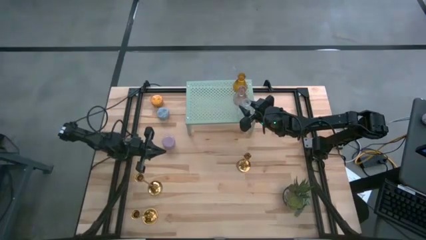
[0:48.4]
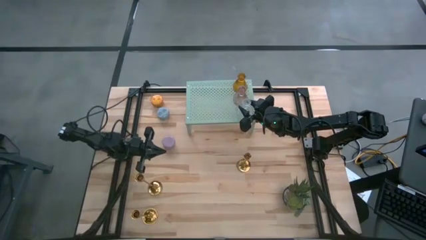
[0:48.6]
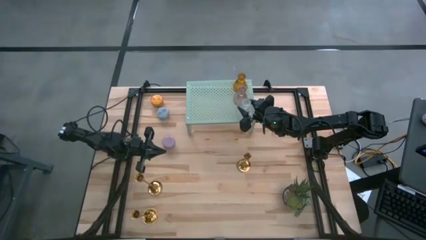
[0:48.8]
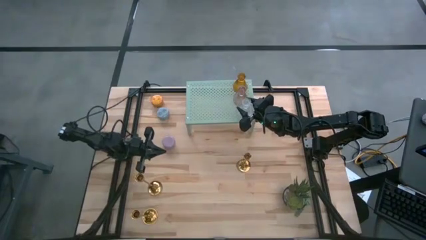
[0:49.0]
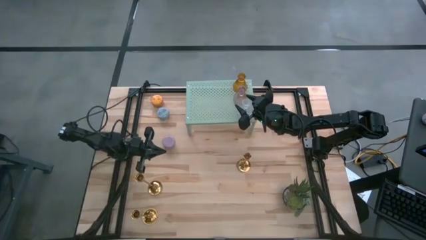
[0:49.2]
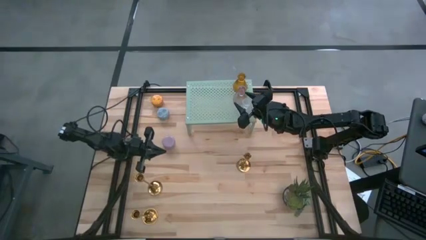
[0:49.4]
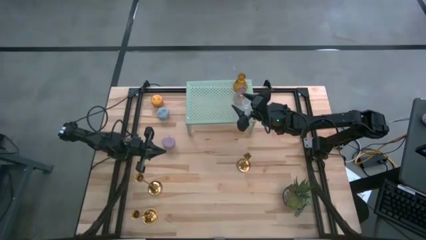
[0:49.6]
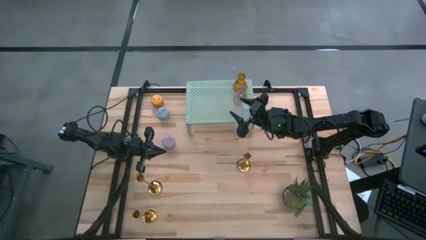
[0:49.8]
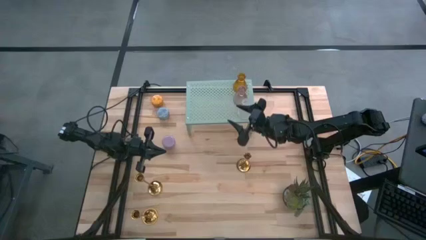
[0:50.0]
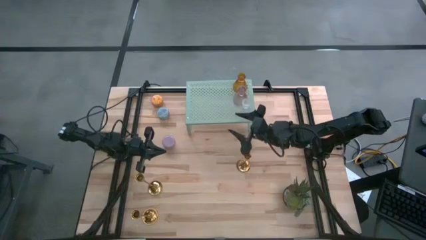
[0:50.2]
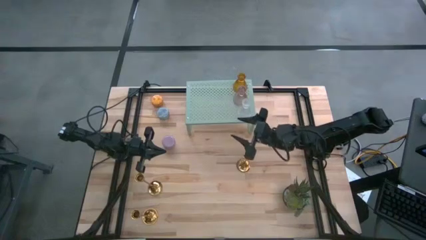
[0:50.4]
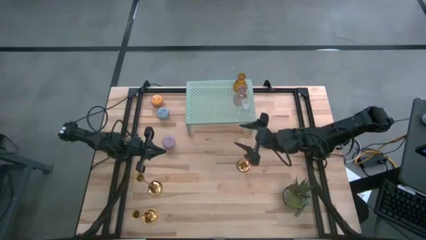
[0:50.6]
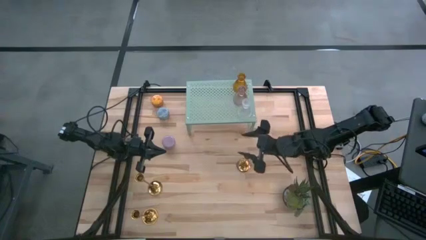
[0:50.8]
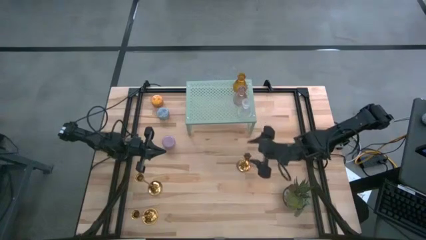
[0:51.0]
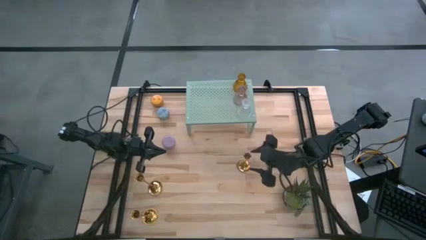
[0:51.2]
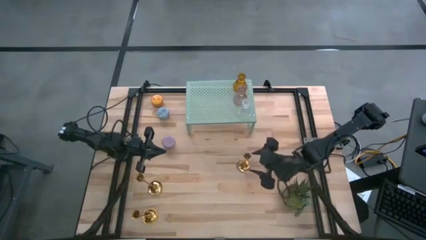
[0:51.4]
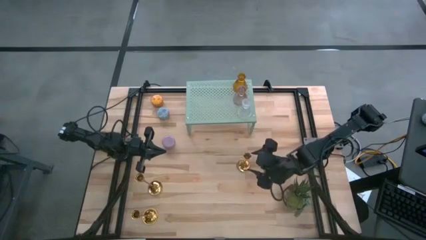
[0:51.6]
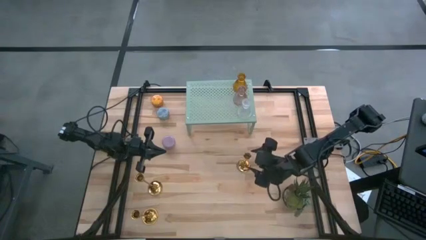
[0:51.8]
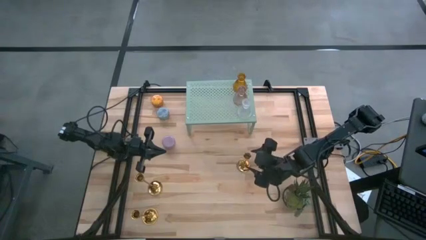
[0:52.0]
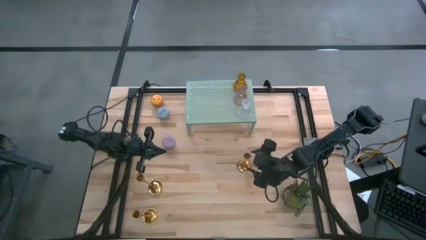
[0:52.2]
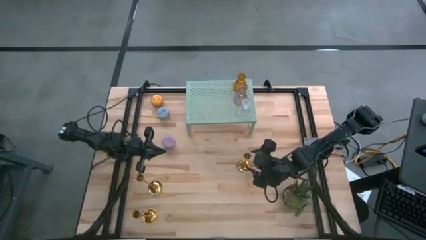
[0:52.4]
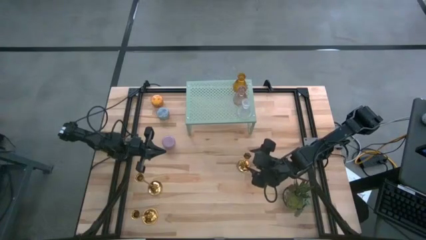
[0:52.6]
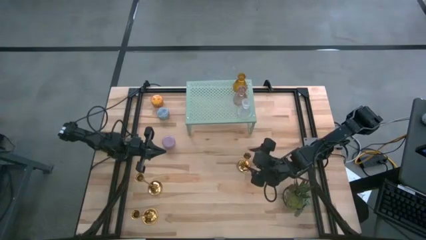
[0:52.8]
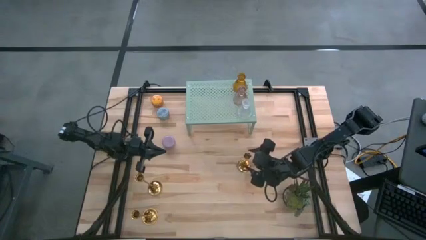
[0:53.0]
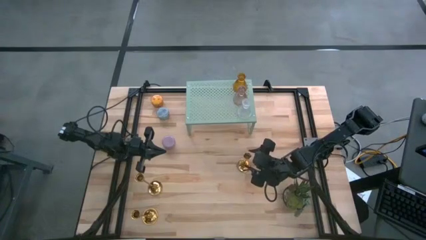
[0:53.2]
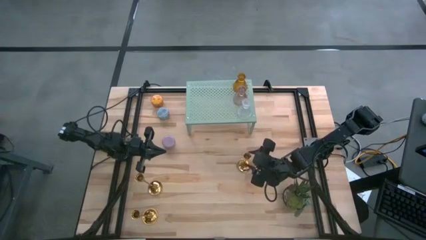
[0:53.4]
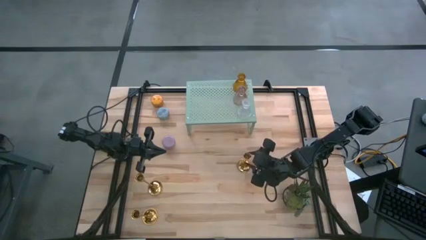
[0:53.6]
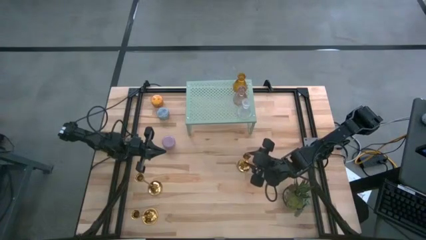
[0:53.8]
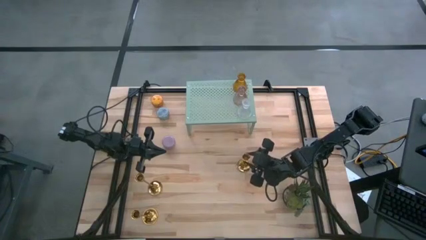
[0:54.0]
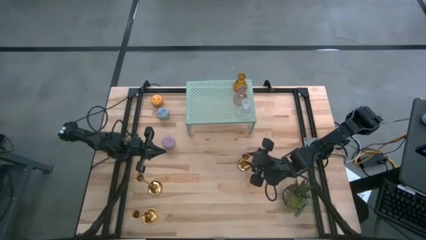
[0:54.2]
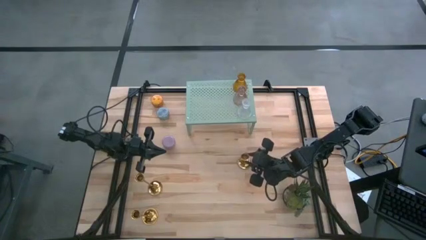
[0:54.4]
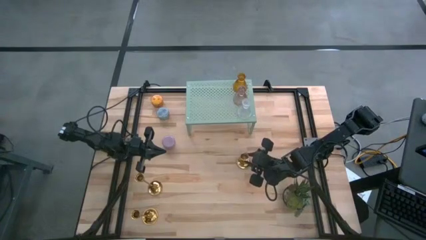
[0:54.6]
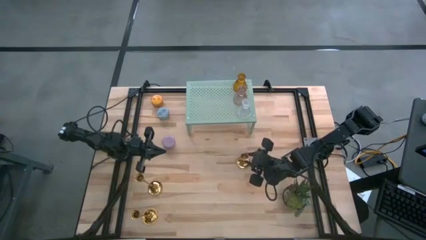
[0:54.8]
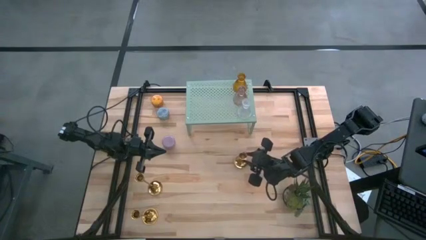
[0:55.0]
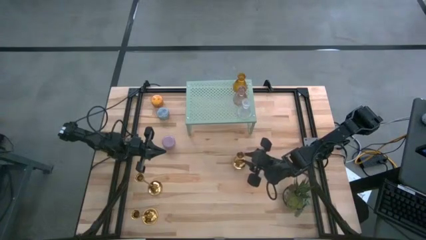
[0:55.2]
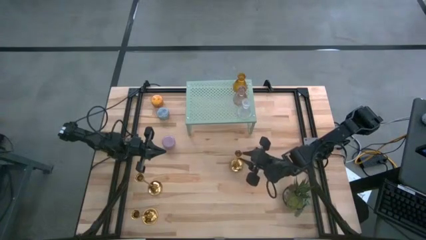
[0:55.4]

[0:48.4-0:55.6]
Task: Pick & Place candle stick holders
Put the top gold candle holder on the shelf

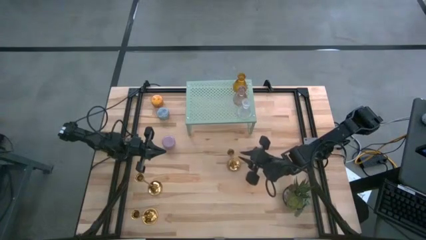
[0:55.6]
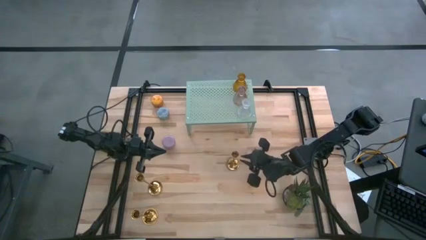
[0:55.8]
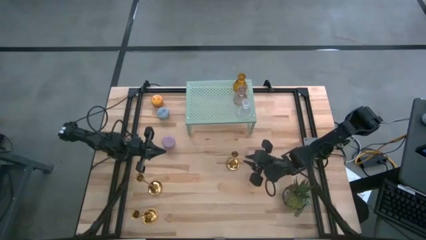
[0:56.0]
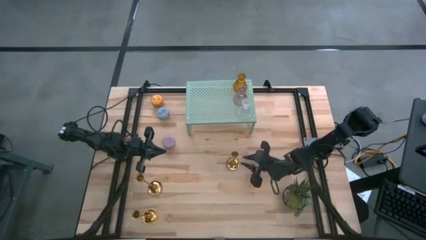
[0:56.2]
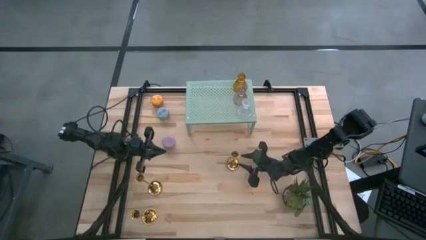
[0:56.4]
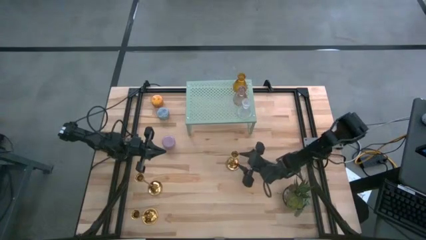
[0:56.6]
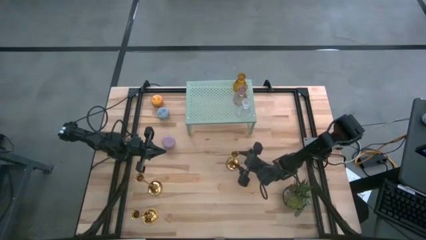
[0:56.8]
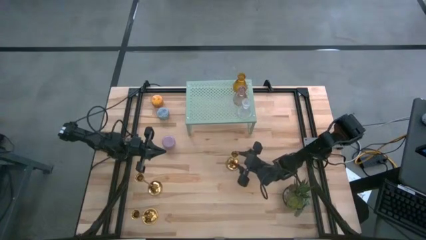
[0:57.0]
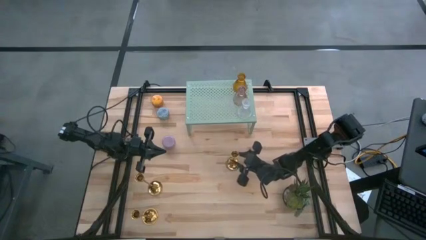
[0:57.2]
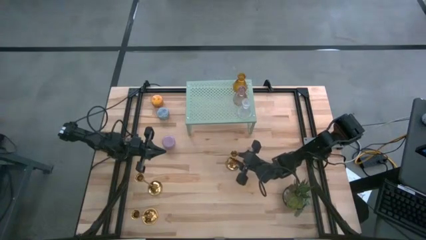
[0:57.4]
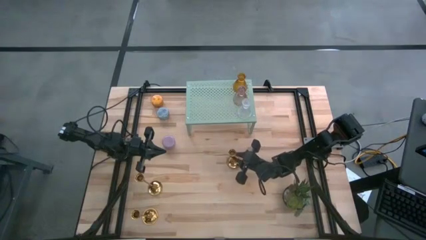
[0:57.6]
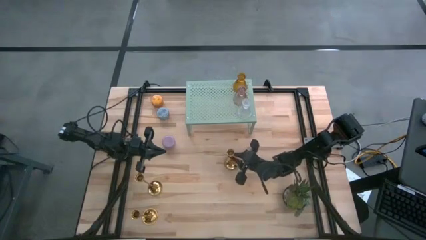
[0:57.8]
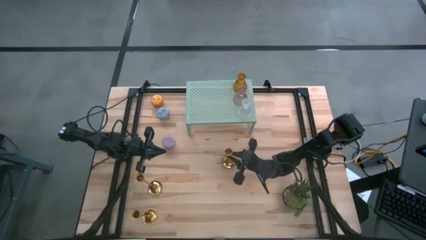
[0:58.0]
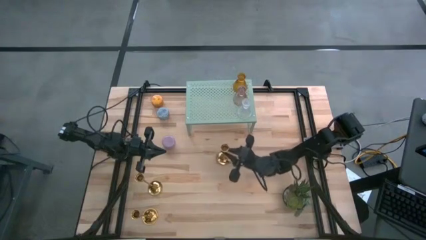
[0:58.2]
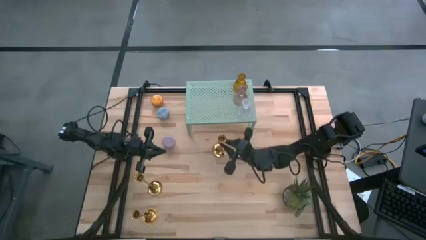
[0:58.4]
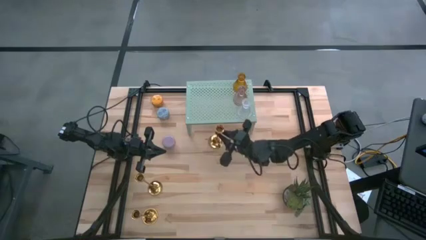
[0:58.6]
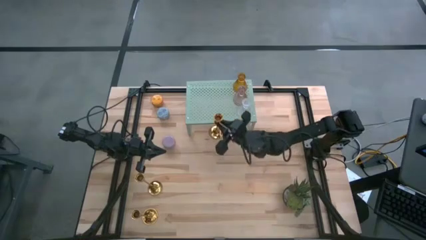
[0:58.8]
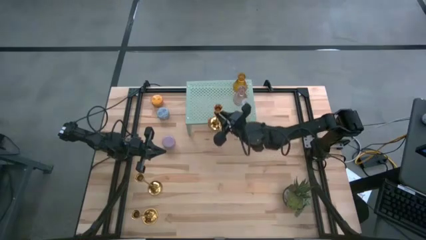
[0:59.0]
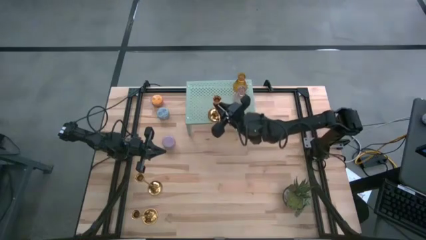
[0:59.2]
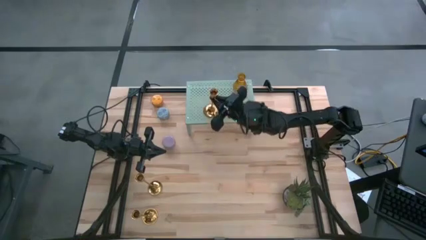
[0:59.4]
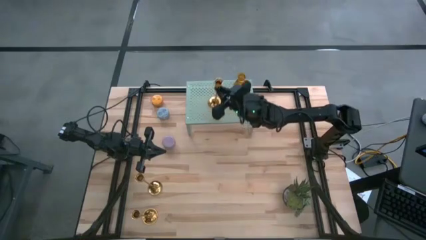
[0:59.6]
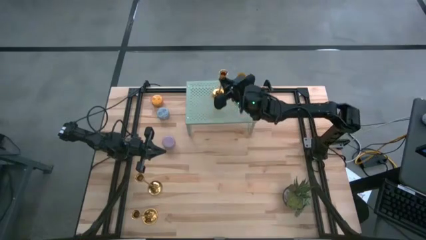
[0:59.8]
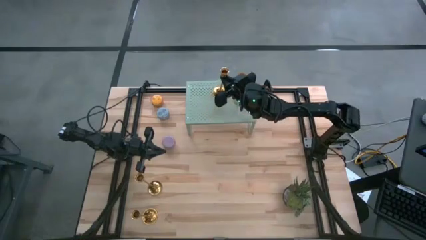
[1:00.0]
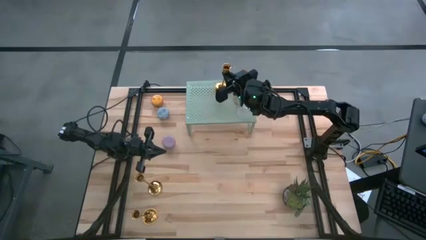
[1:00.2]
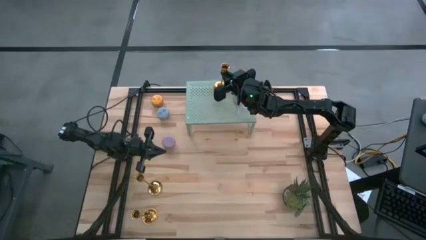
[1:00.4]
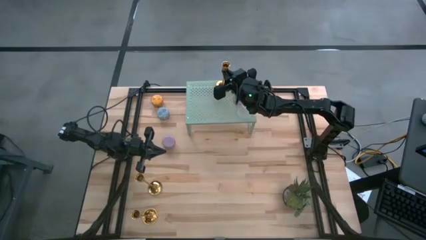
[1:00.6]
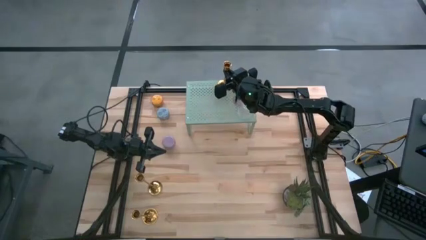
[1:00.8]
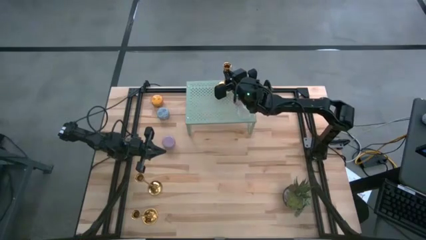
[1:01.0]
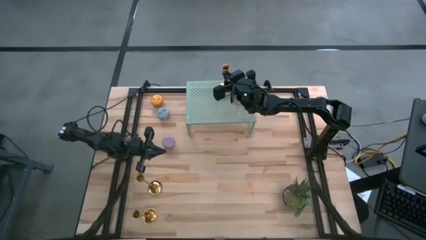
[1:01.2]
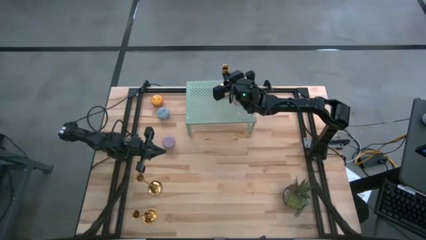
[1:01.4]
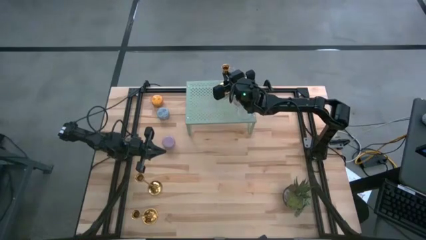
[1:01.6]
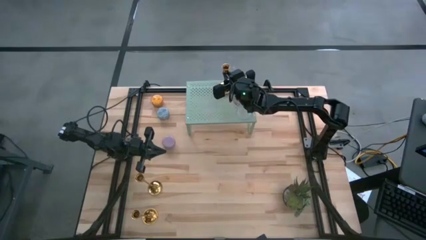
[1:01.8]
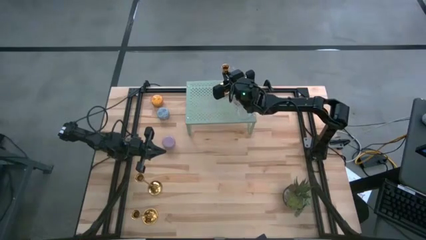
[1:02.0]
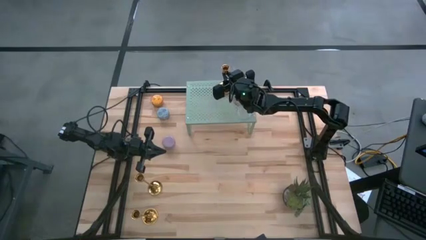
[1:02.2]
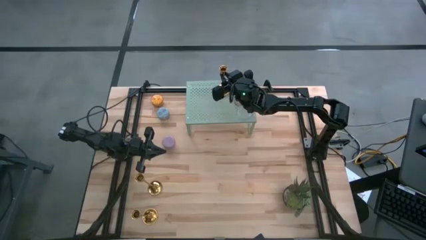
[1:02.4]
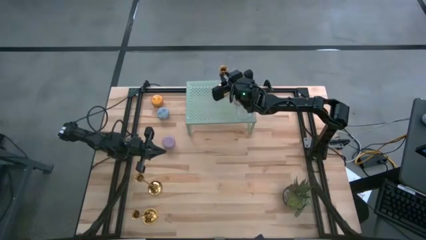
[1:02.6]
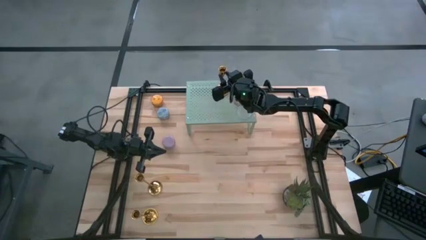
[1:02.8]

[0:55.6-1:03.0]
Put the top gold candle holder on the shelf

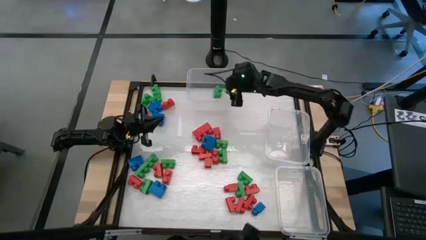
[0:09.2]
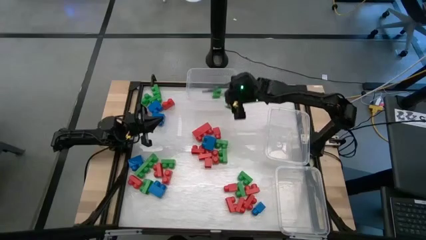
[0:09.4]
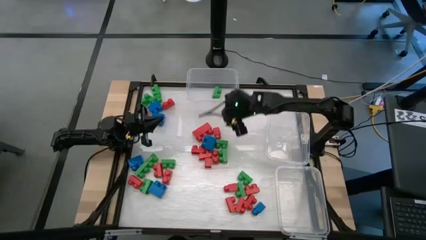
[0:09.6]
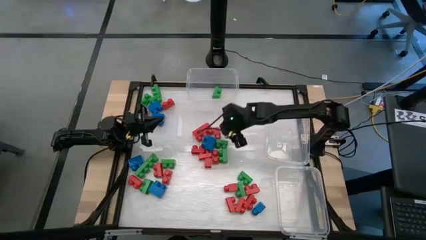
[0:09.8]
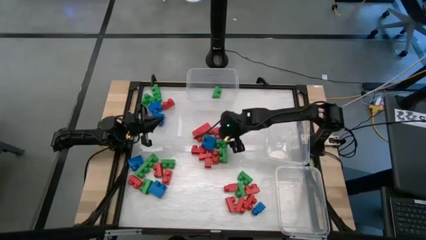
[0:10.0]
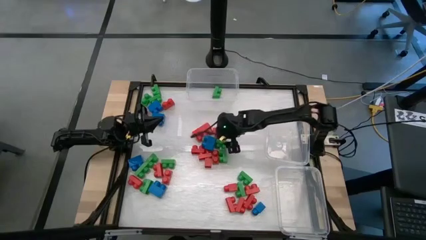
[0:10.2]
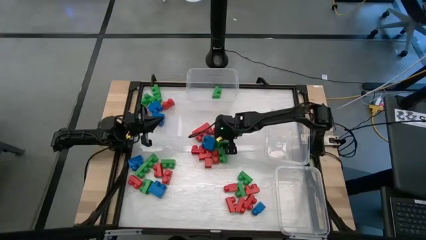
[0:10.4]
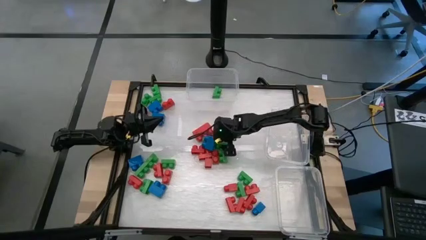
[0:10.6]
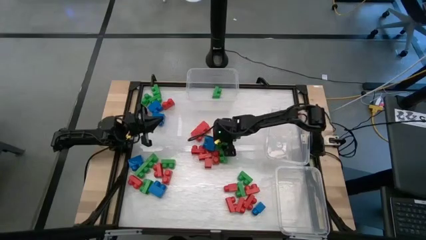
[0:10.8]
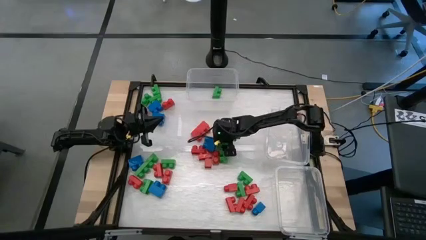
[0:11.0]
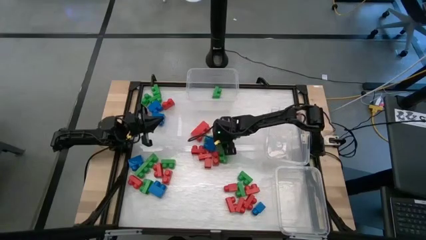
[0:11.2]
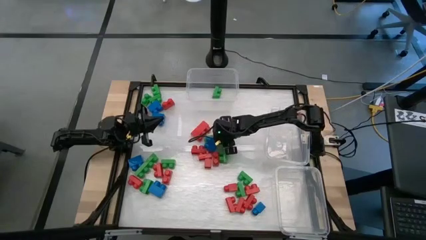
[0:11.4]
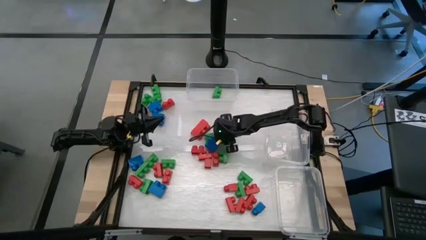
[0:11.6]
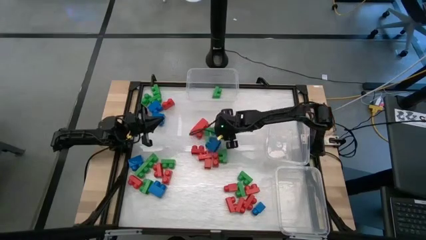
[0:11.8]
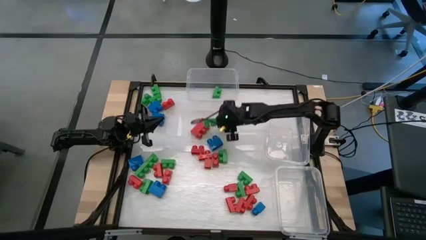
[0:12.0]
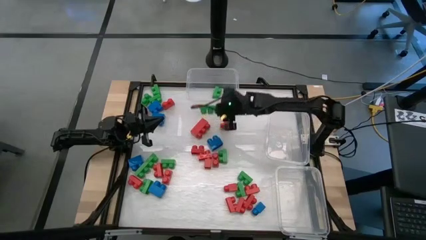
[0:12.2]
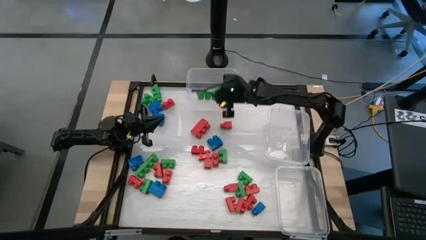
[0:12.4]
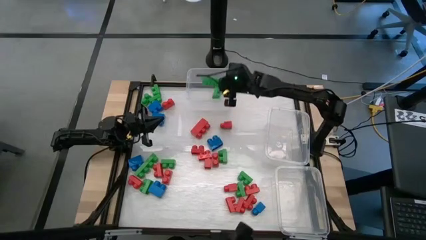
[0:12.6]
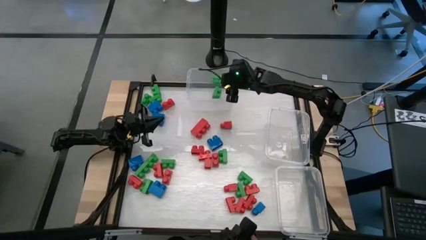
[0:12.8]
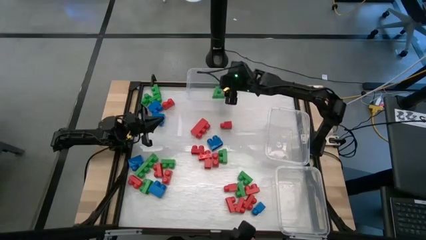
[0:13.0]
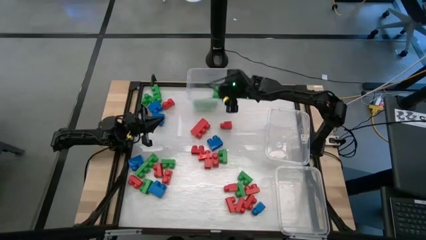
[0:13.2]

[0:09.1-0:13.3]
Task: Sort blocks
Put the green game piece into the top transparent bin
